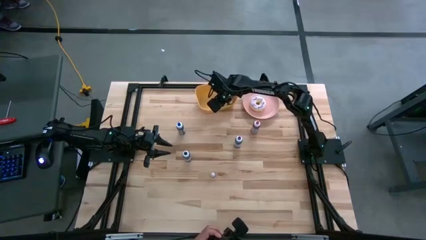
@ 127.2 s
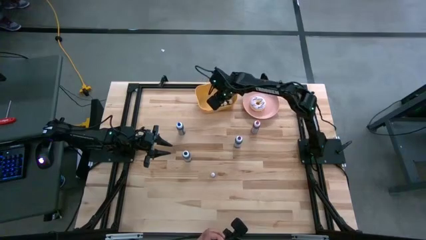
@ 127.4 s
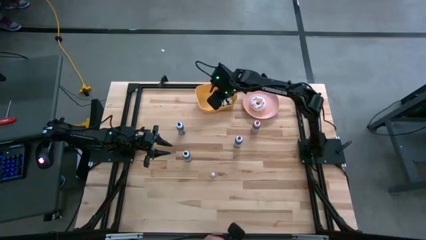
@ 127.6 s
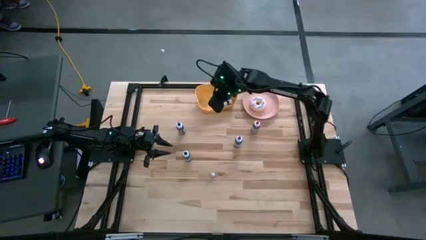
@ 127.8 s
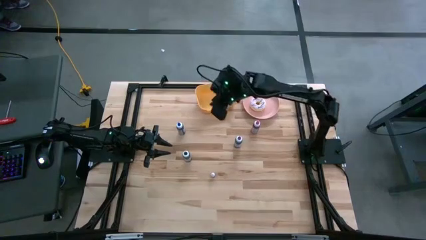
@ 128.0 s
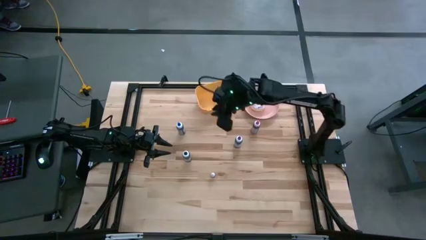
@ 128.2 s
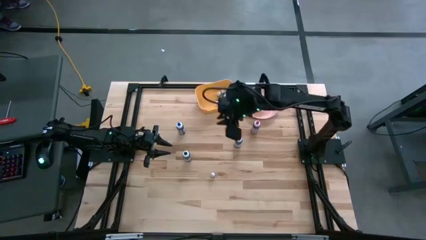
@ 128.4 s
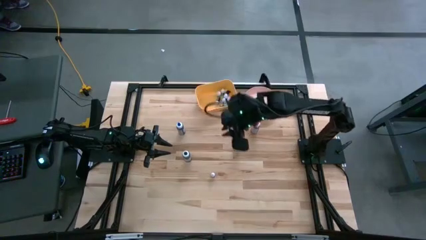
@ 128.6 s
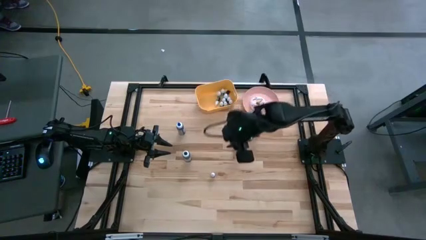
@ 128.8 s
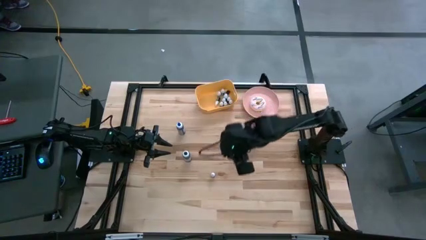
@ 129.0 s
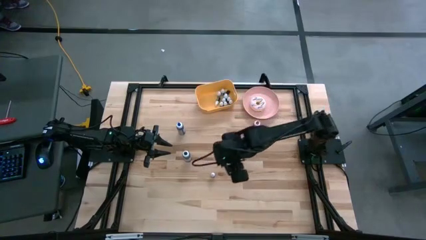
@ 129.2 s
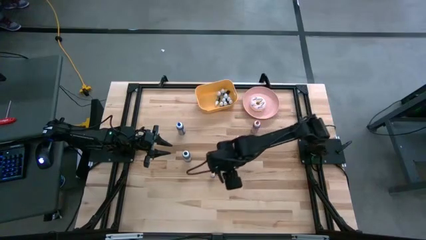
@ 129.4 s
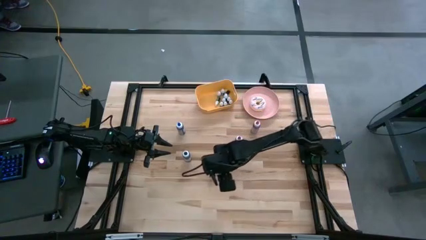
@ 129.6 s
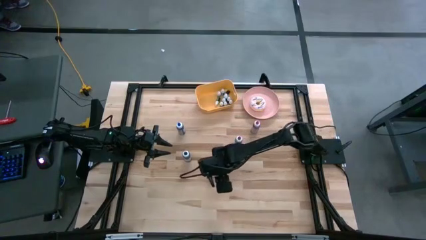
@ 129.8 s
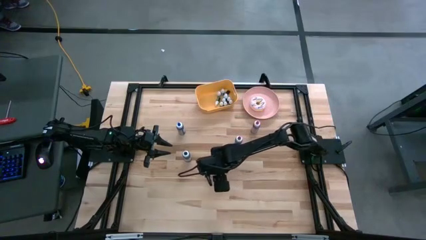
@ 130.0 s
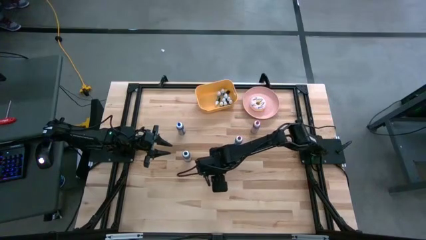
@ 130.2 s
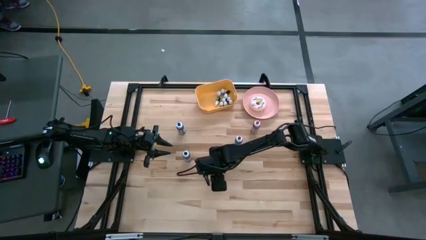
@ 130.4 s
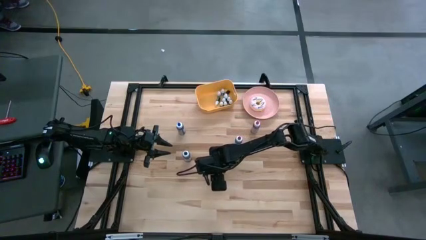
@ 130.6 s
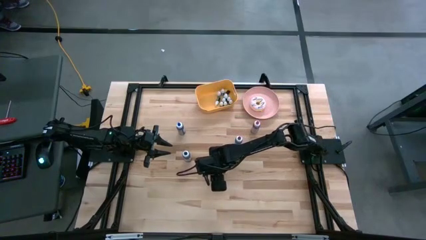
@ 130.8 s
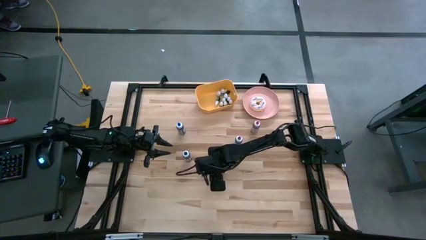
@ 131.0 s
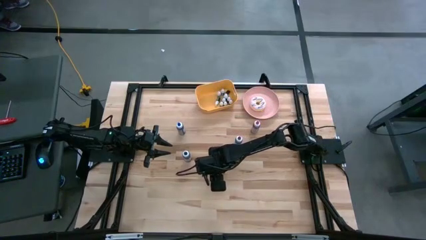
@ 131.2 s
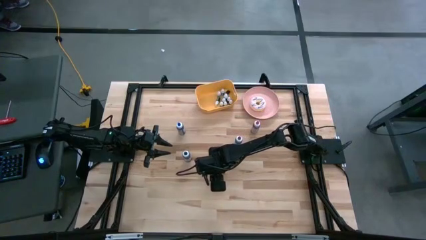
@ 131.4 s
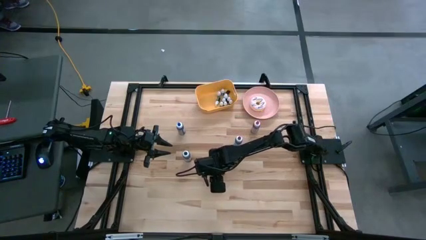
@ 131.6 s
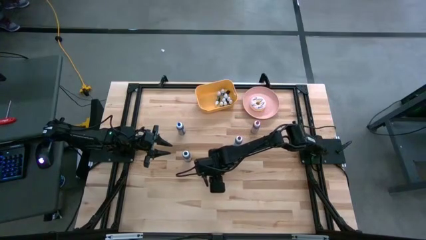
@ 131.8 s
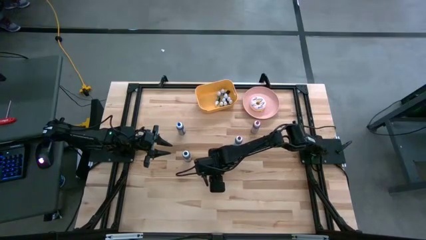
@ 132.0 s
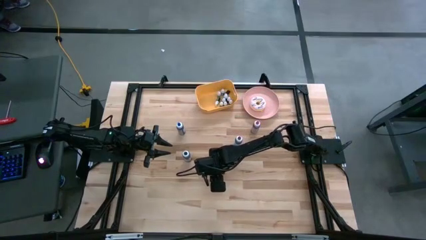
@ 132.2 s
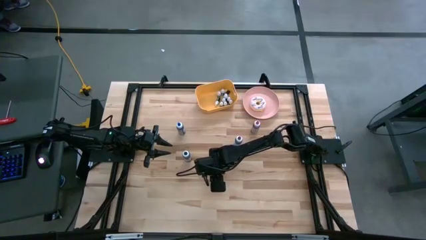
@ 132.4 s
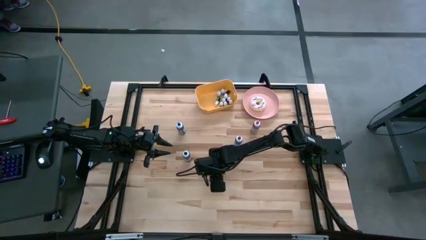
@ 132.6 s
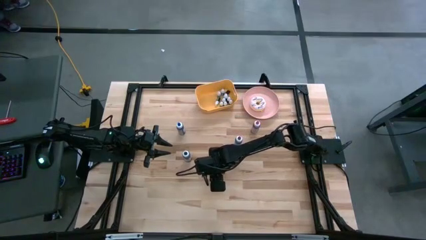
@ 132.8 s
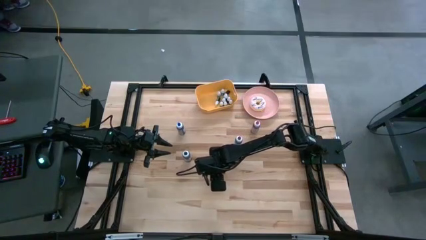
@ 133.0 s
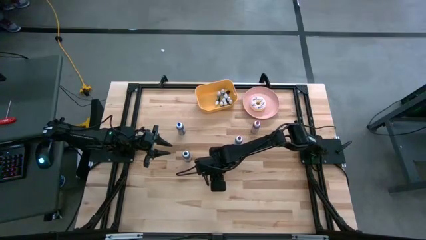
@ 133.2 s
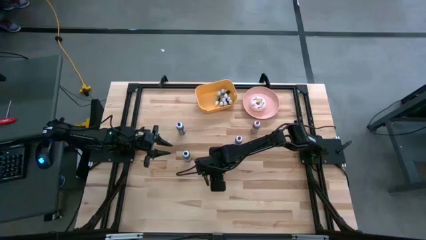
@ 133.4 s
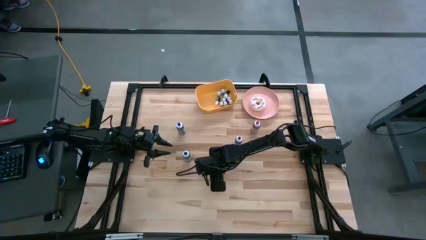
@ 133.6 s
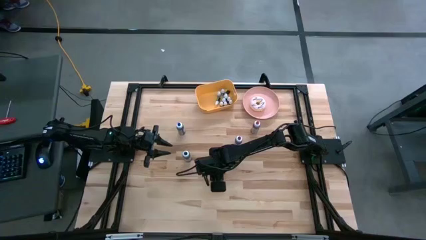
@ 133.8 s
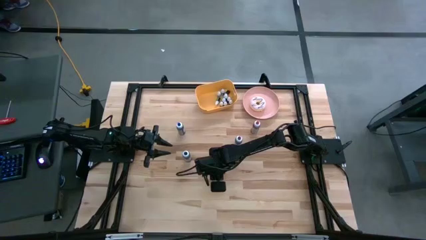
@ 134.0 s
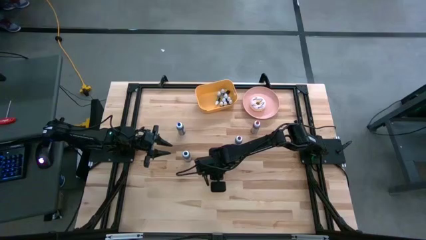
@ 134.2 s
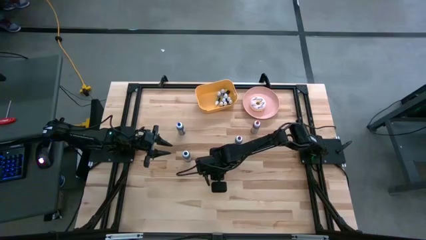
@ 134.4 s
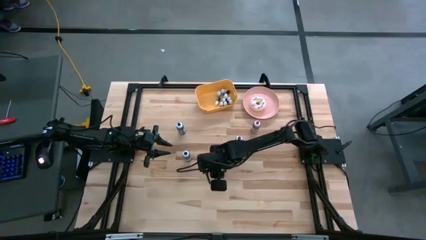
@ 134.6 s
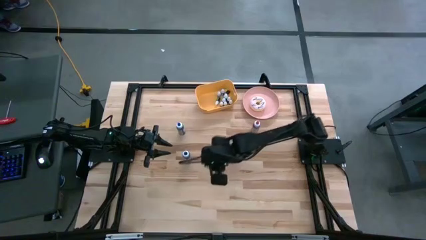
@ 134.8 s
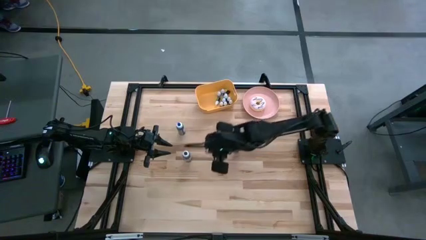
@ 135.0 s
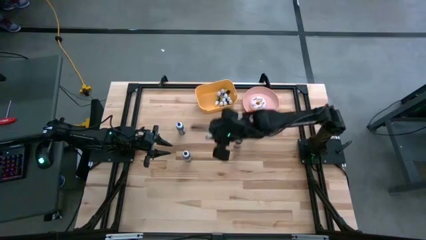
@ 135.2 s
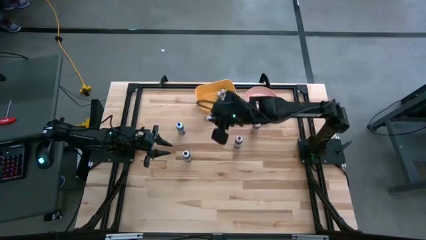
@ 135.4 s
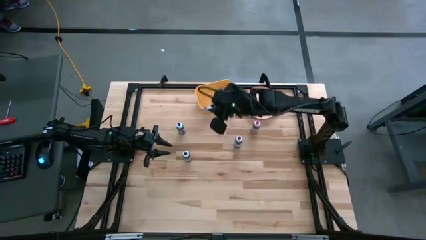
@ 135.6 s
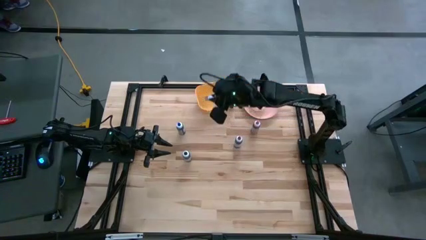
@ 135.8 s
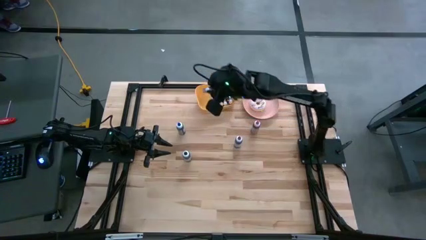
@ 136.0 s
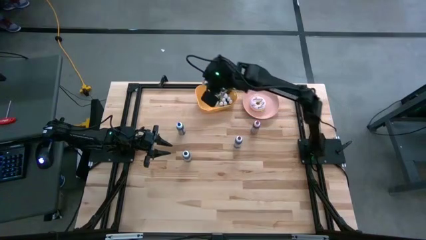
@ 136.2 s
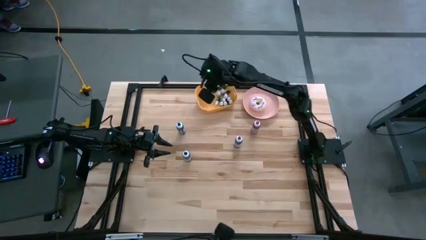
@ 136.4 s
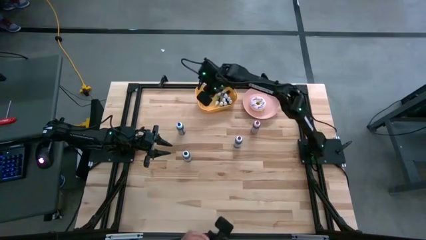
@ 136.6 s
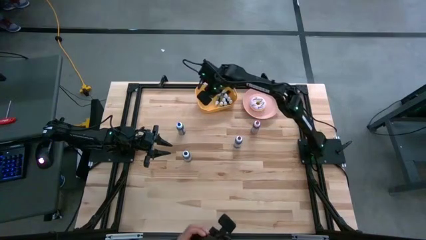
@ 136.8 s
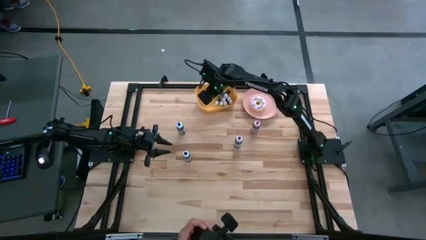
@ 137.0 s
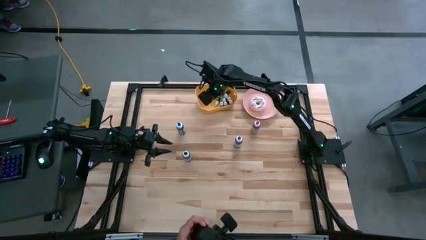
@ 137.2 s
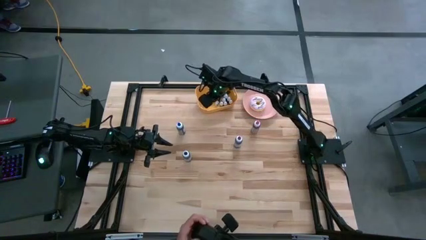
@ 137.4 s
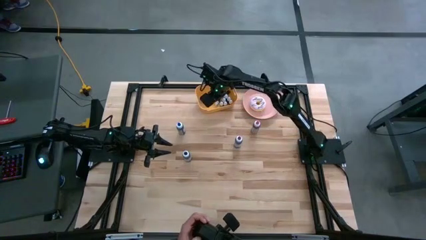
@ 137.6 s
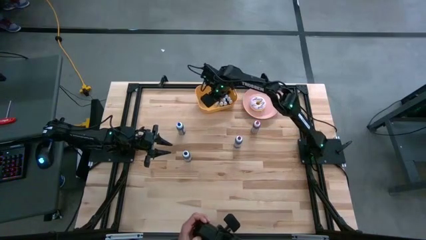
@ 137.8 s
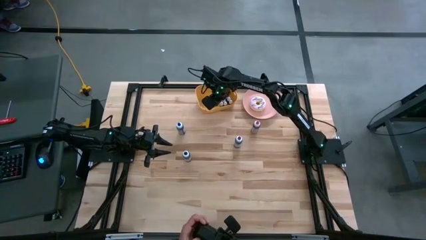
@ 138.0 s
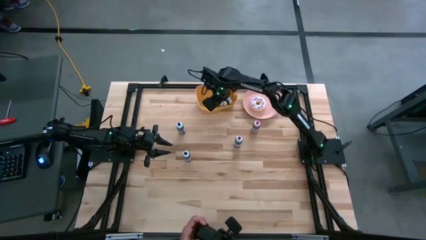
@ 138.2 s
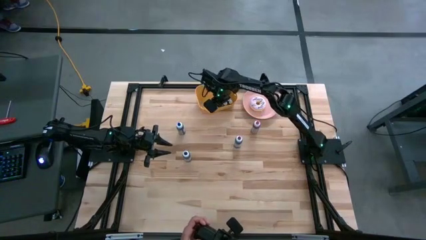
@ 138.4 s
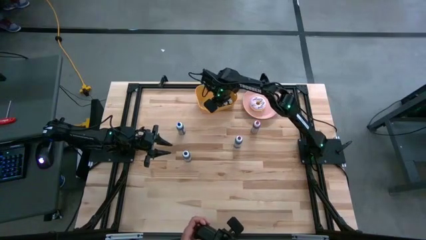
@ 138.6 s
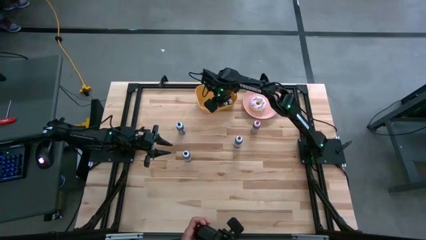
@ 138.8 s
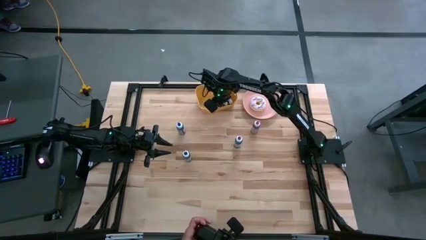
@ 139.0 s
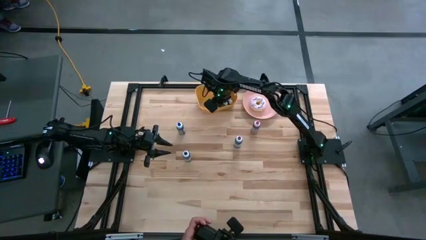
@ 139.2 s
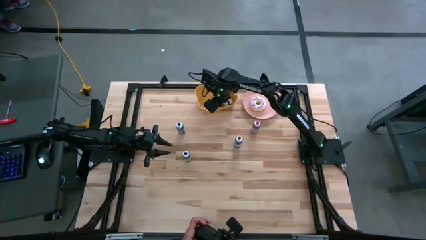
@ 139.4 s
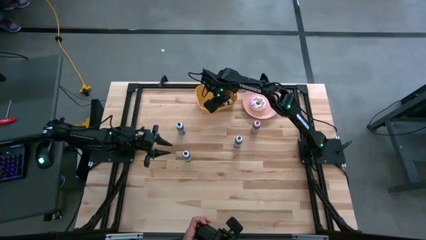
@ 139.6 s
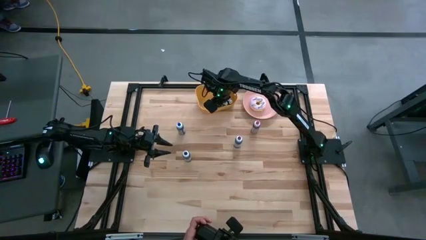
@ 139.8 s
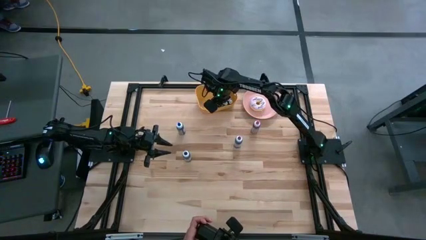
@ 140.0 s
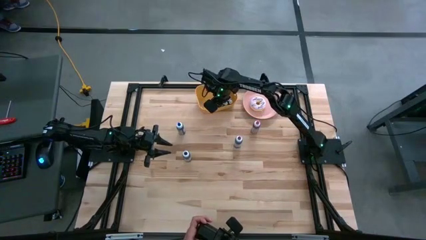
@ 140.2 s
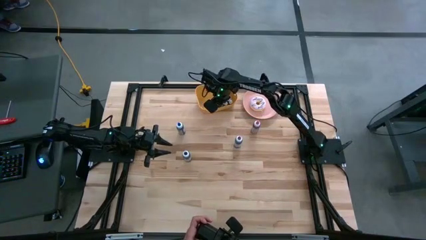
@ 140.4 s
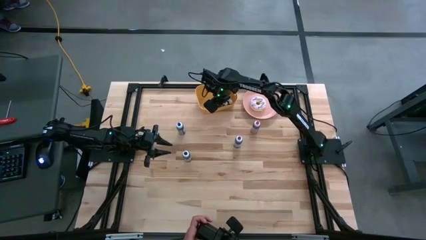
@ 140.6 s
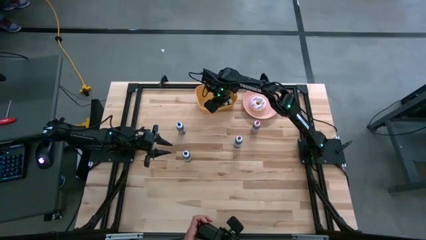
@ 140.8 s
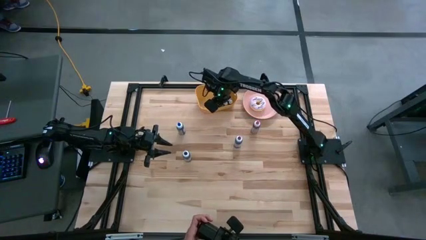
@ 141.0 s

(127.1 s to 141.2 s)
Task: Pick & Place food coloring
Put the small orange food coloring bottle into the yellow bin

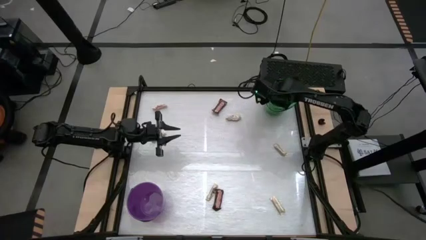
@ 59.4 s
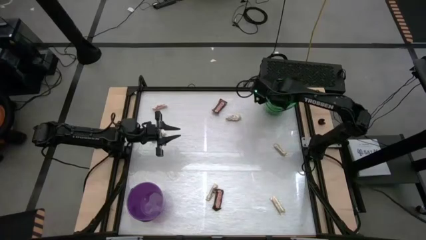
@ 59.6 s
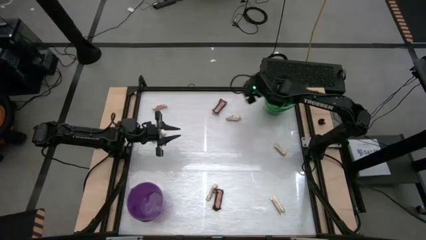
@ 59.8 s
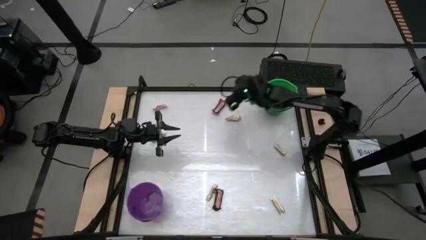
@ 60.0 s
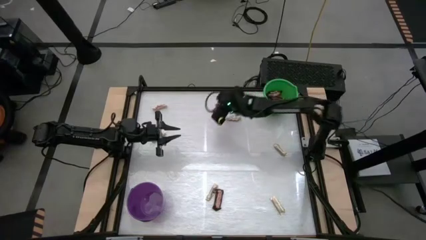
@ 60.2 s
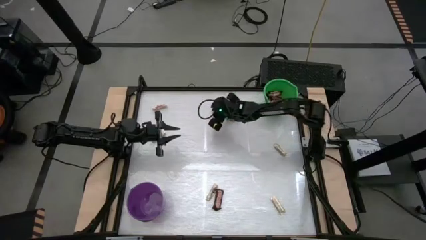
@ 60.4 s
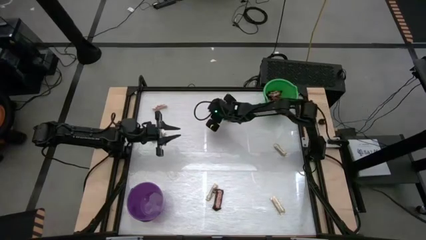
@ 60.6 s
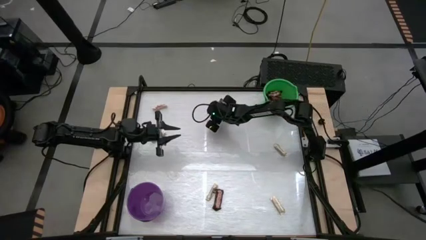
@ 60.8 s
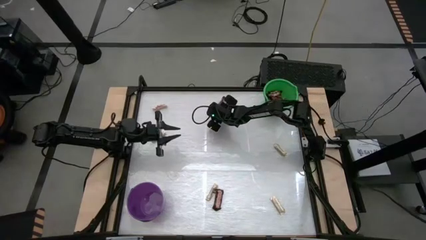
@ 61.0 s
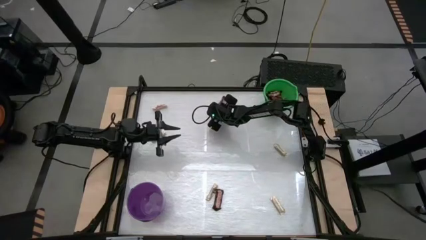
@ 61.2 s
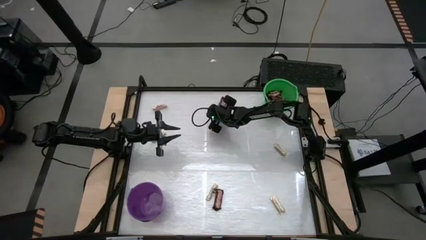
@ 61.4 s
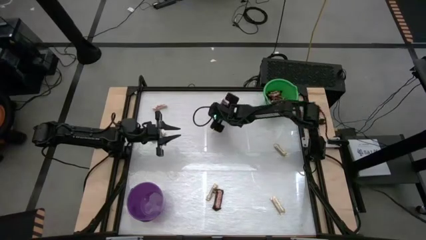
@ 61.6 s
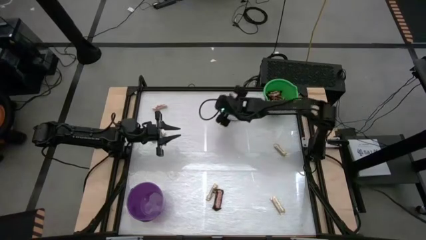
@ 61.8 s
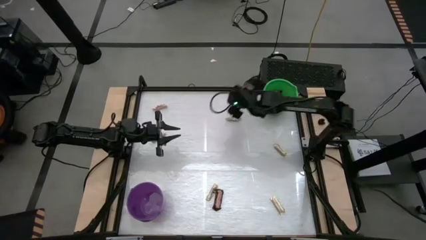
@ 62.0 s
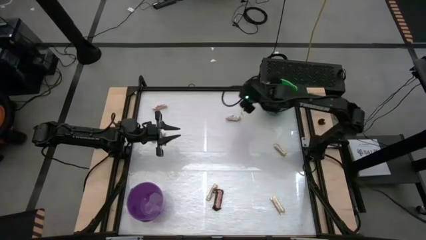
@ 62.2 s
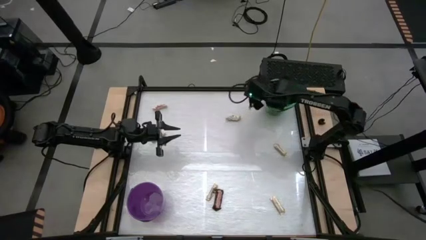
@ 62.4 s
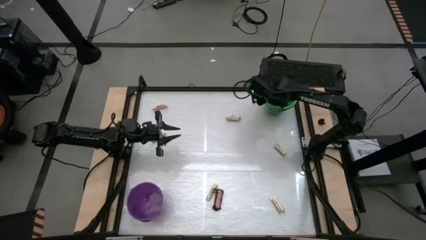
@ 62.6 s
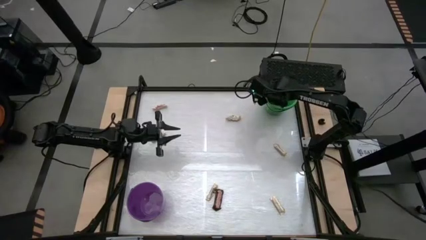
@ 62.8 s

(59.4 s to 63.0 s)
Task: Sort candy by brand, put in halloween buckets
Put the brown candy bar into the green bucket
